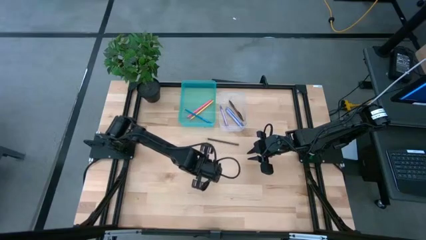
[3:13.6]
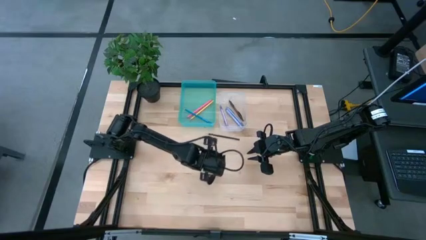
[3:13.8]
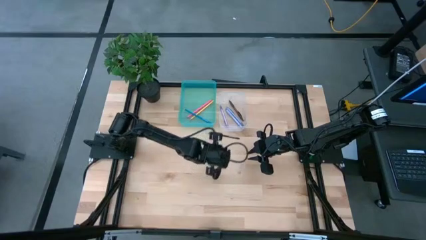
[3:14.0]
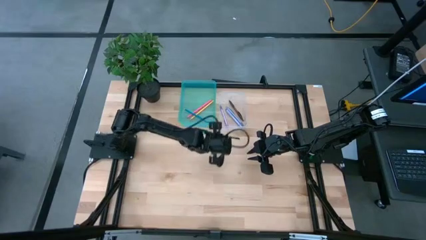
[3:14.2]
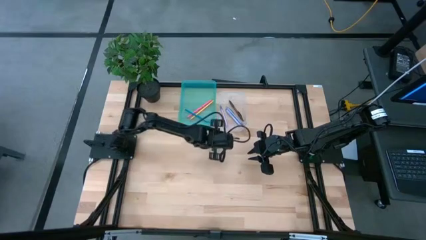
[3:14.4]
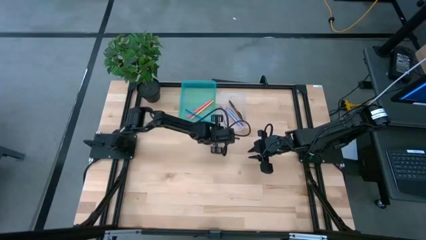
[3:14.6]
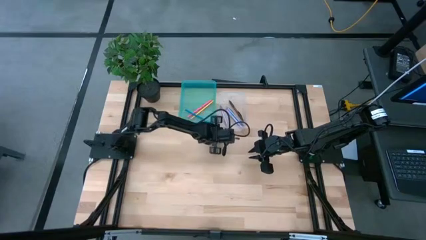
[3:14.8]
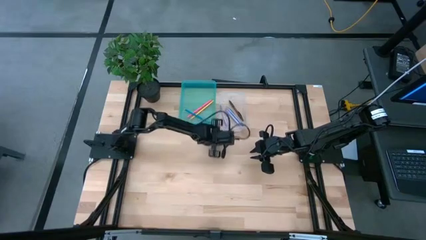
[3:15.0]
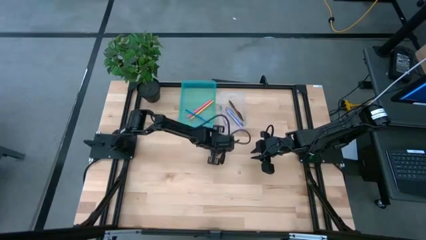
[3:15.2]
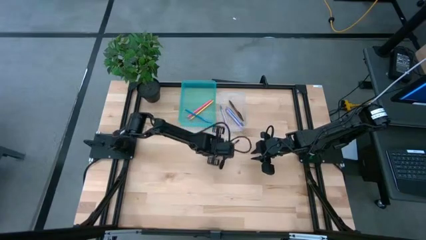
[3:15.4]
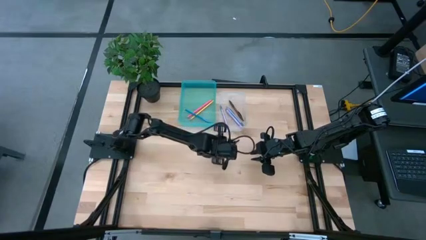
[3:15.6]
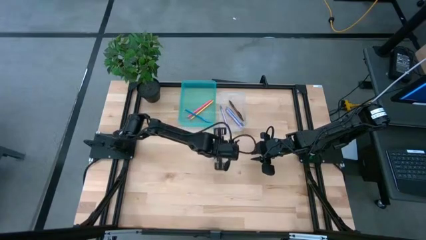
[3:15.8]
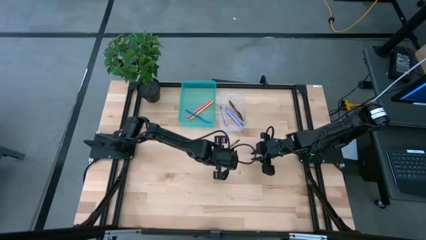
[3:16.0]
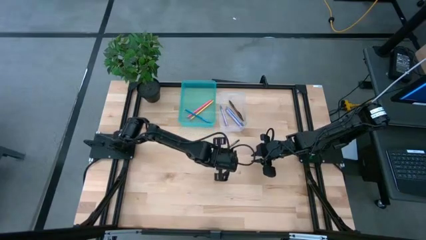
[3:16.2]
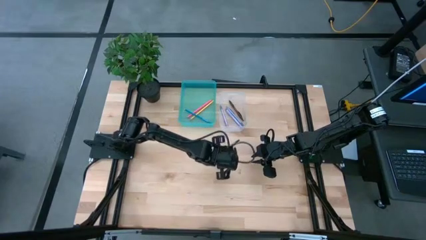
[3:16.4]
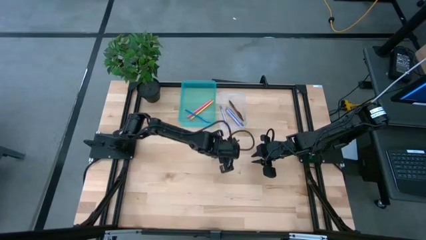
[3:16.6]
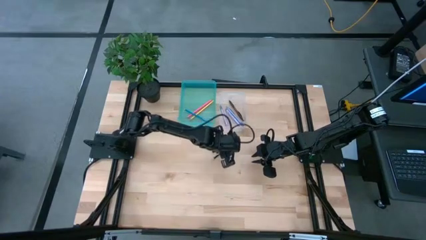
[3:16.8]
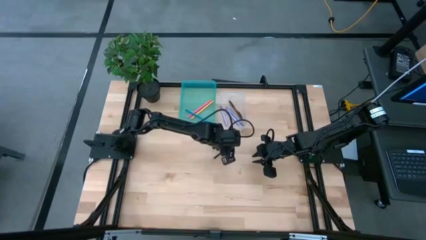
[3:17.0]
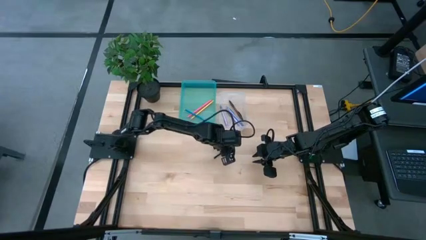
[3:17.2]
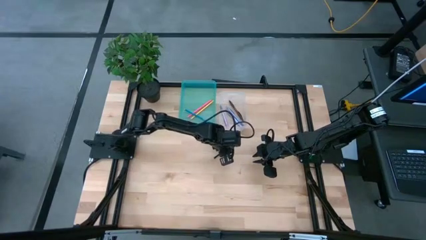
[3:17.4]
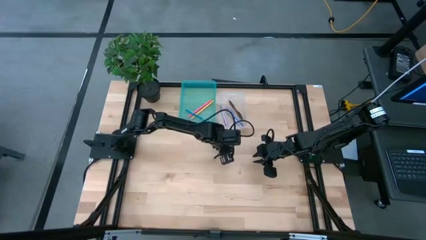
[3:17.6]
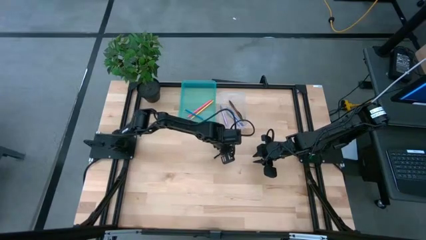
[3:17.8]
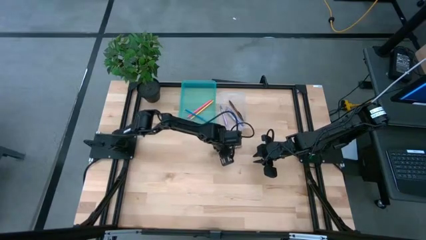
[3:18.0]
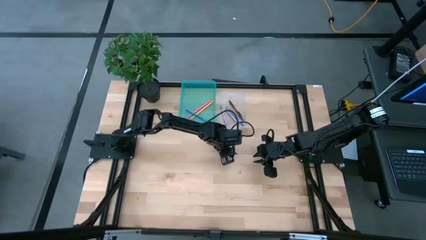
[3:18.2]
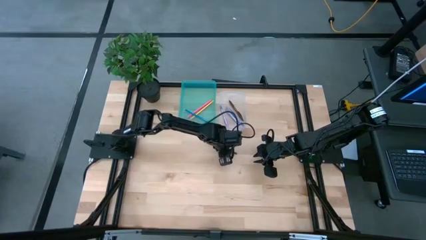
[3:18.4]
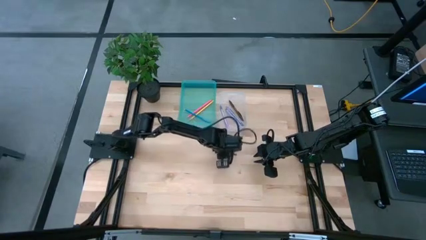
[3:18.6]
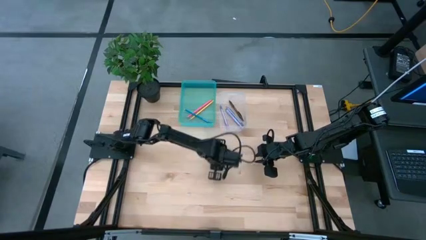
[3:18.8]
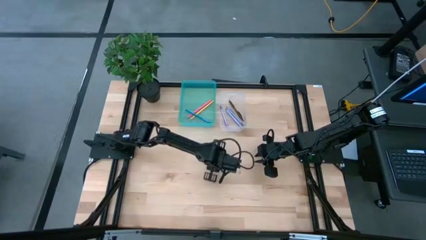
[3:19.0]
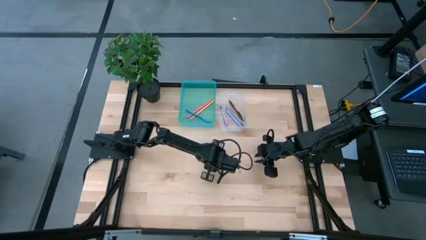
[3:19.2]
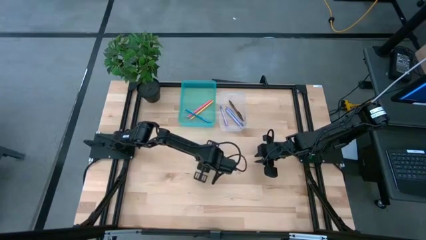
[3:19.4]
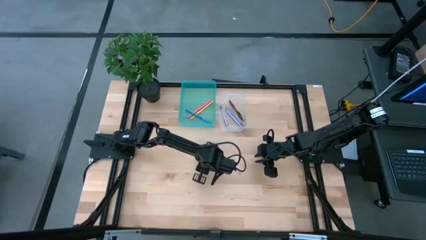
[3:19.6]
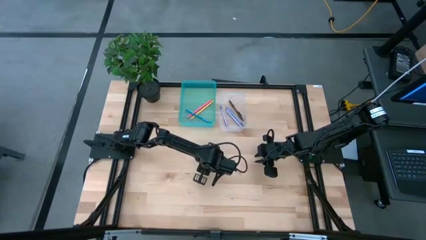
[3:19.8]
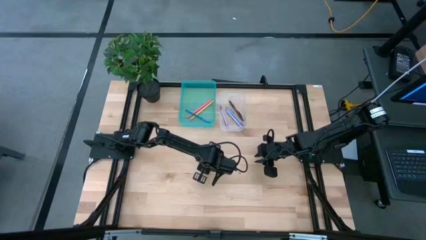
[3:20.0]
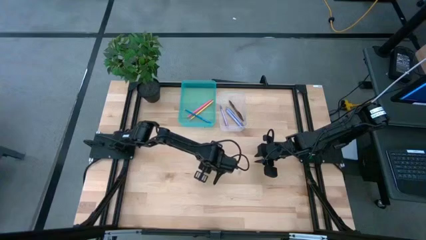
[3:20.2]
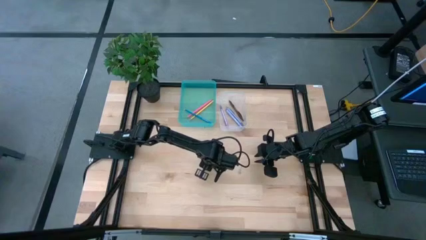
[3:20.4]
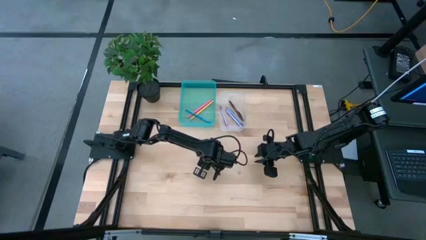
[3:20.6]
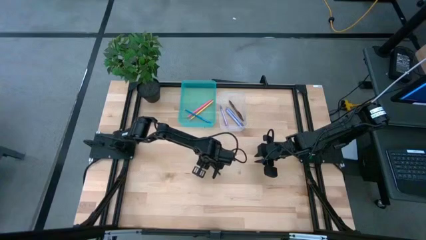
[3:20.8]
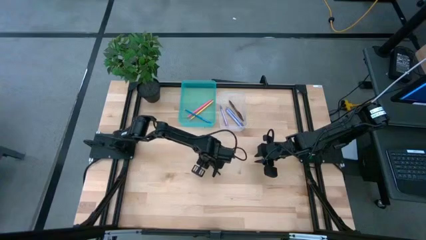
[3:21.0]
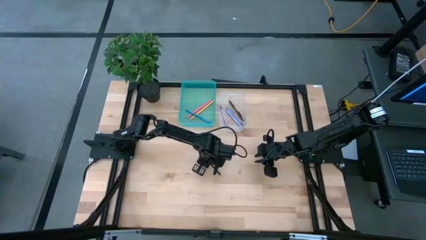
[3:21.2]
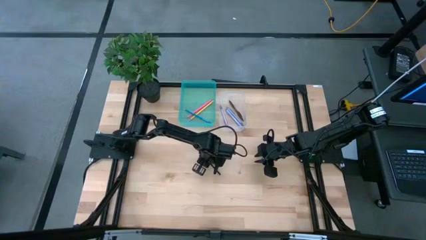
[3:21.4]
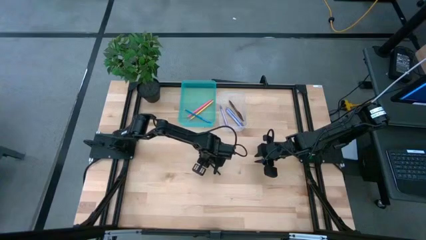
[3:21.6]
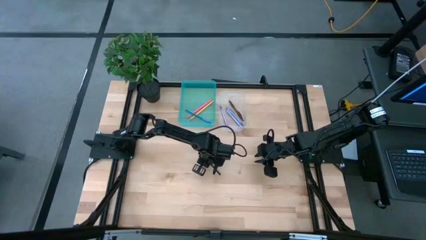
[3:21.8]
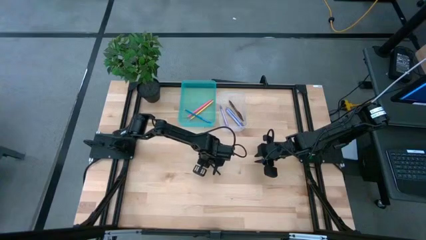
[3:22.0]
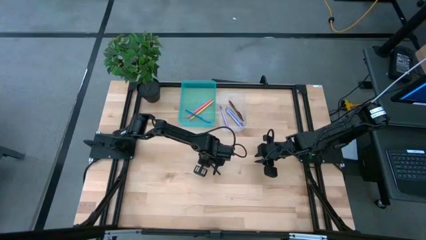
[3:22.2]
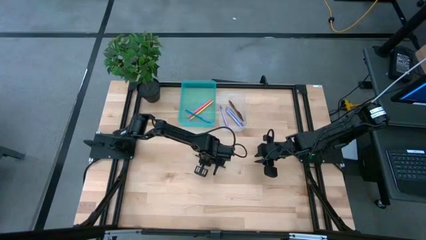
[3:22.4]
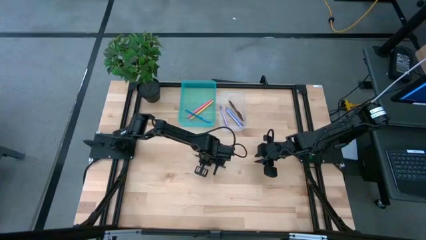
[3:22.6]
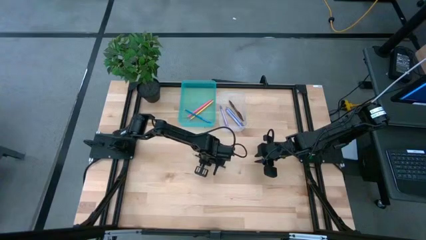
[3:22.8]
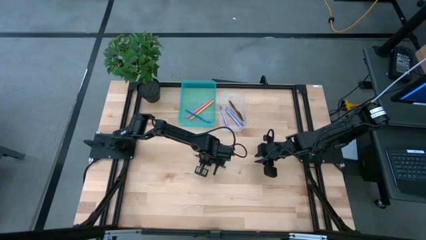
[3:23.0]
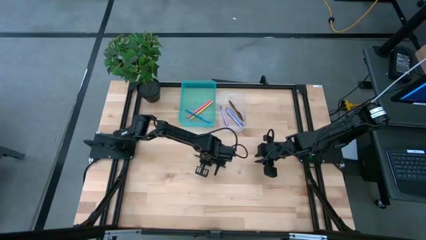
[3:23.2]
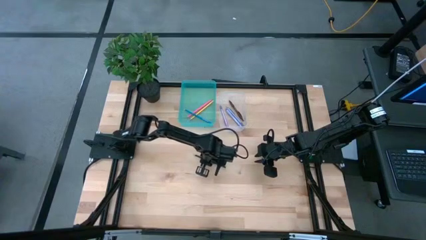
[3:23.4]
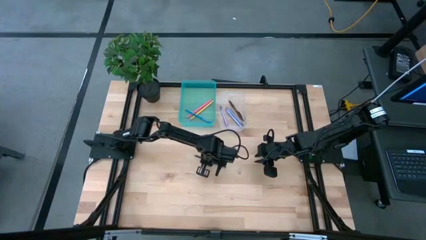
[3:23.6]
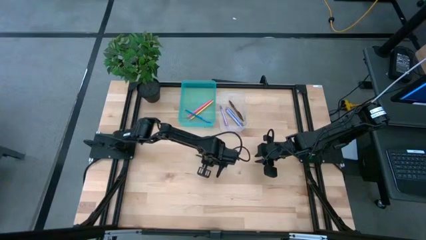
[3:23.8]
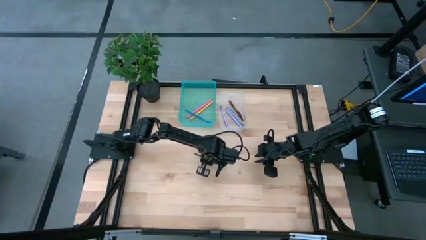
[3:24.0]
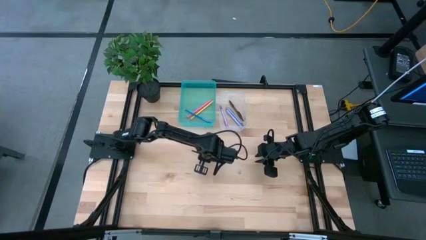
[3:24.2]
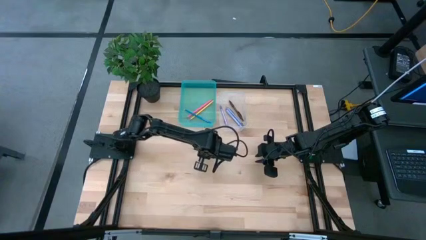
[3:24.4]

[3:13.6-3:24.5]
Task: Sort pens & pencils
Put the black pencil into the blue bin

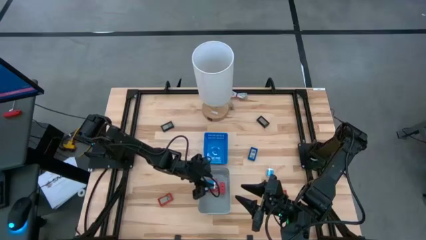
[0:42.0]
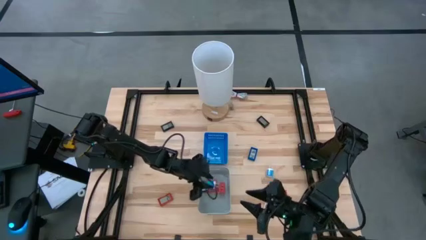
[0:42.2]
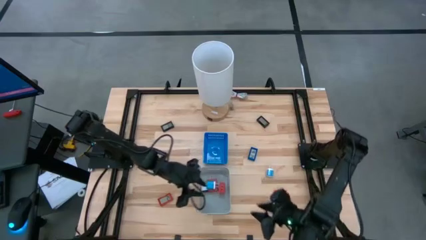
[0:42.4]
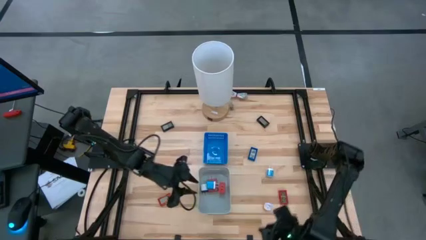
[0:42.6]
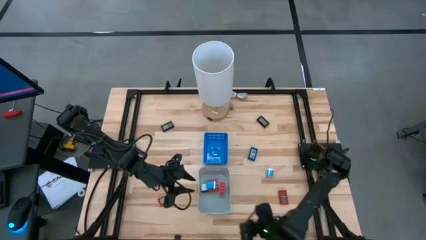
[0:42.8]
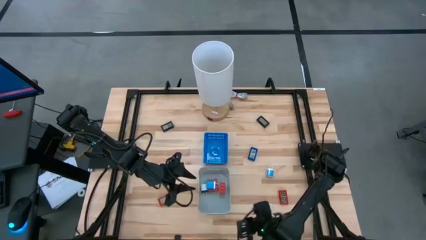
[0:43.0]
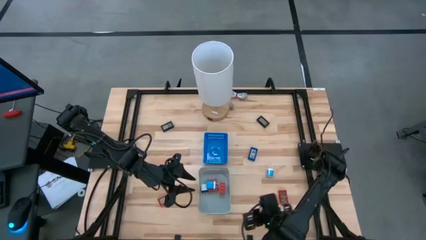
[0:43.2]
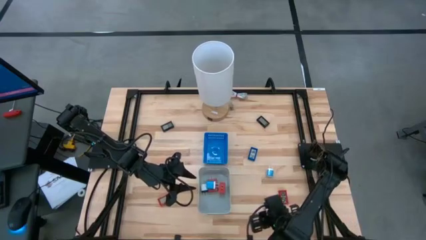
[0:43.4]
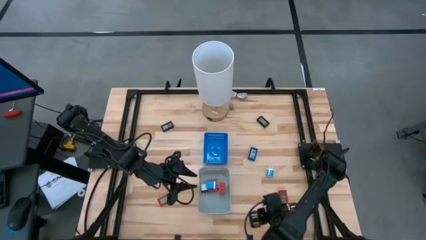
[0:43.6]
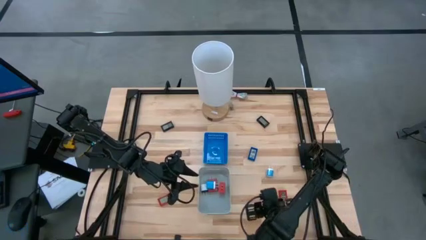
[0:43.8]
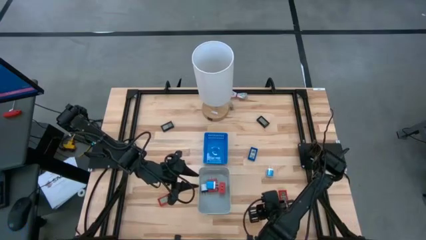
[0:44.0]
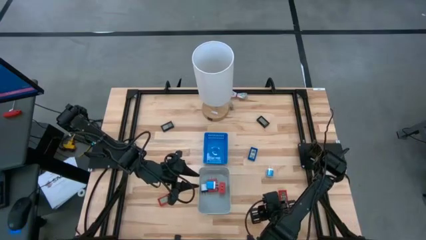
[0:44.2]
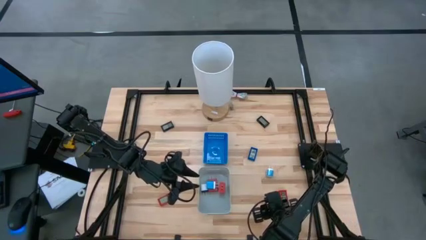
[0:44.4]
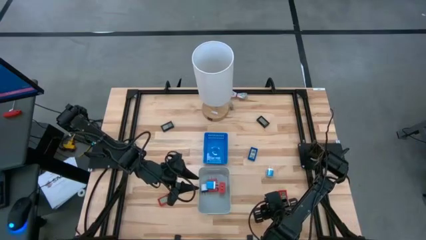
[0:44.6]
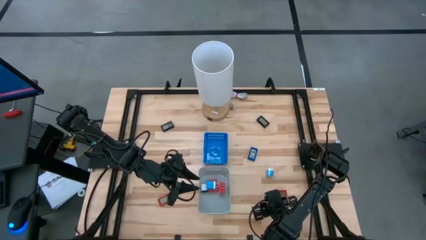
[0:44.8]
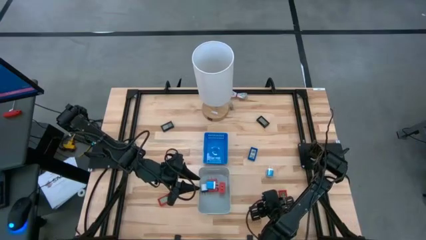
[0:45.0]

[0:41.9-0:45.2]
Task: Pick & Place Office items
Put the pink charger adapter into the gray bin
